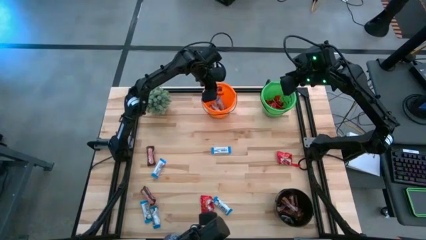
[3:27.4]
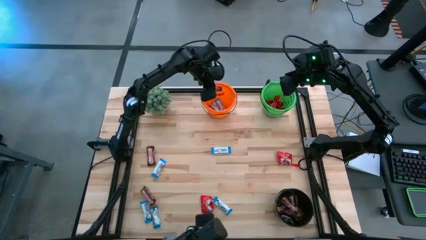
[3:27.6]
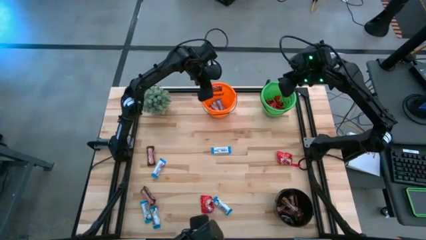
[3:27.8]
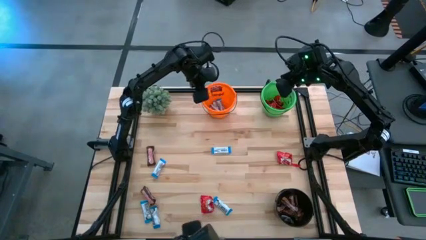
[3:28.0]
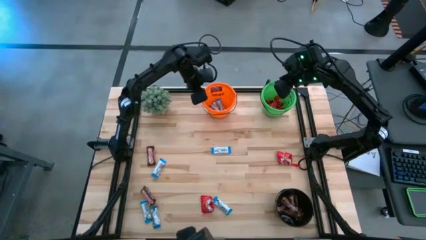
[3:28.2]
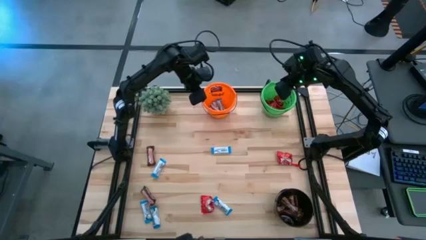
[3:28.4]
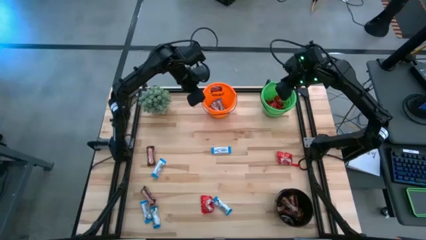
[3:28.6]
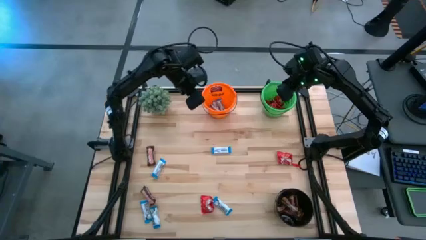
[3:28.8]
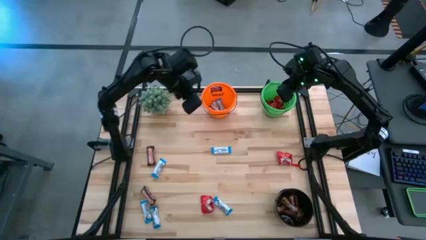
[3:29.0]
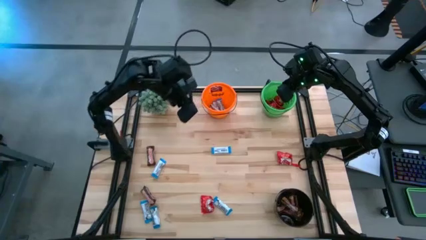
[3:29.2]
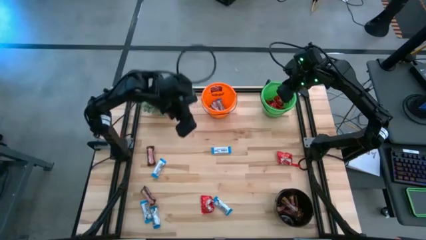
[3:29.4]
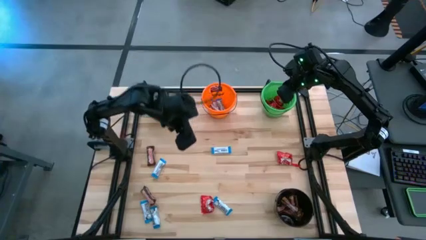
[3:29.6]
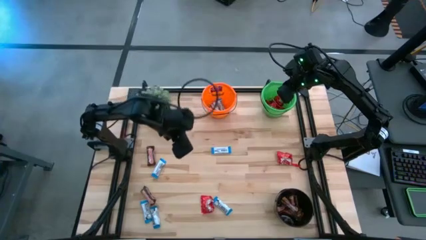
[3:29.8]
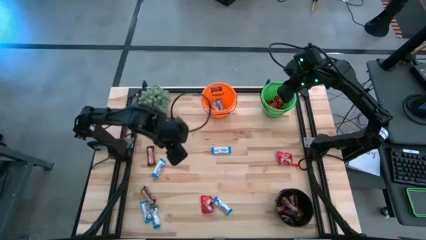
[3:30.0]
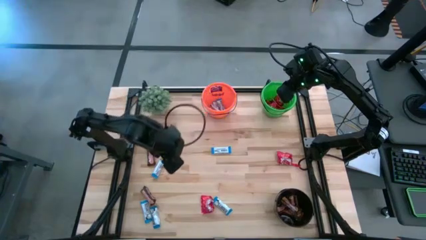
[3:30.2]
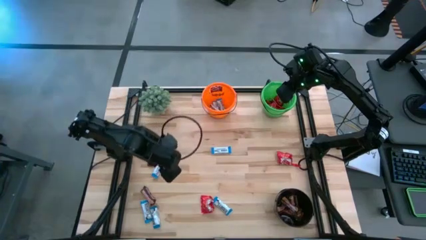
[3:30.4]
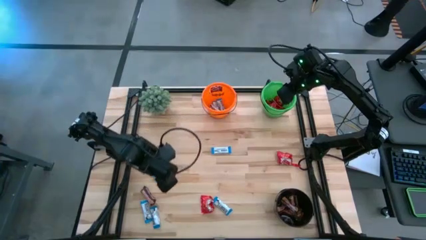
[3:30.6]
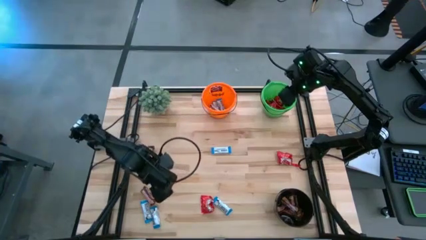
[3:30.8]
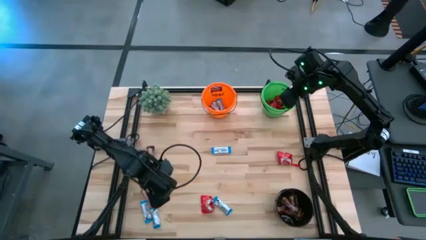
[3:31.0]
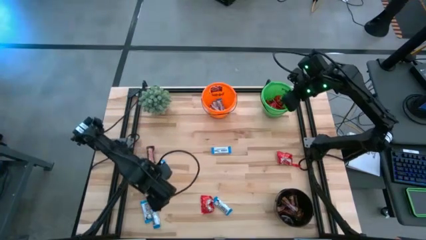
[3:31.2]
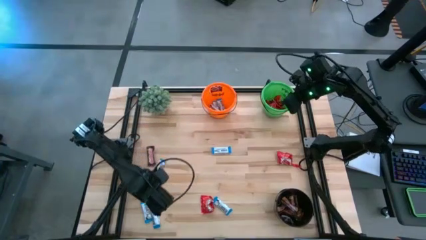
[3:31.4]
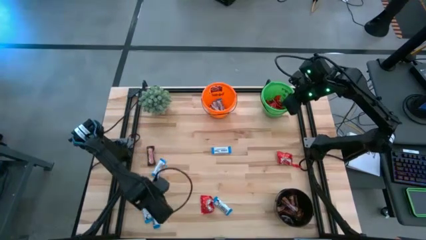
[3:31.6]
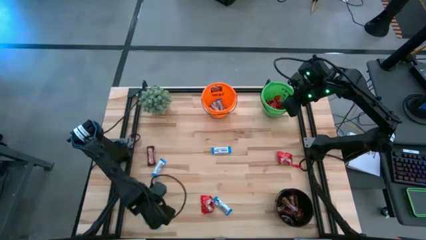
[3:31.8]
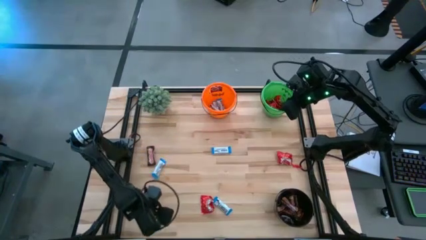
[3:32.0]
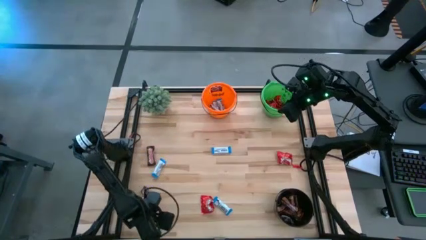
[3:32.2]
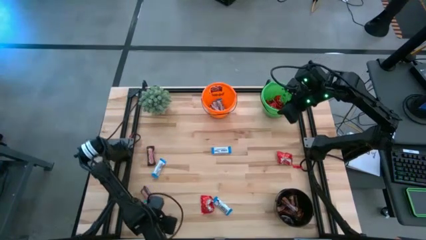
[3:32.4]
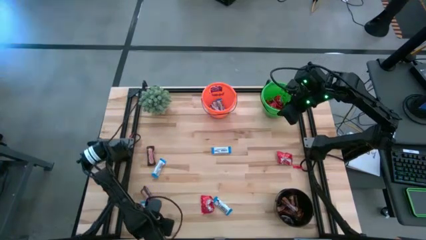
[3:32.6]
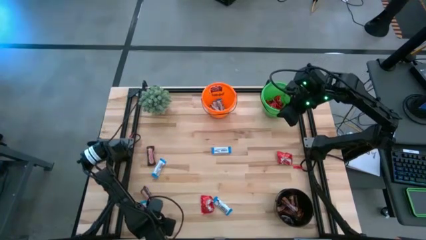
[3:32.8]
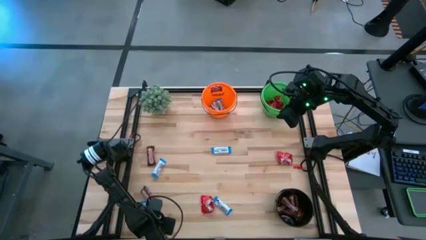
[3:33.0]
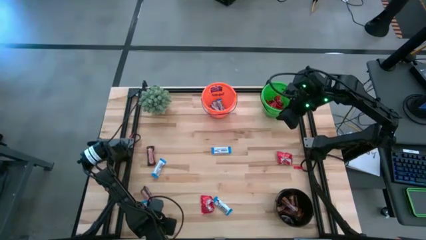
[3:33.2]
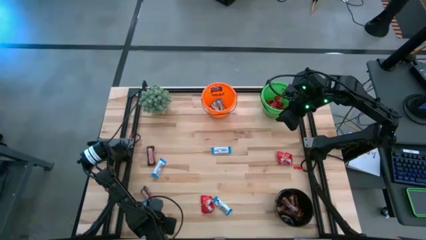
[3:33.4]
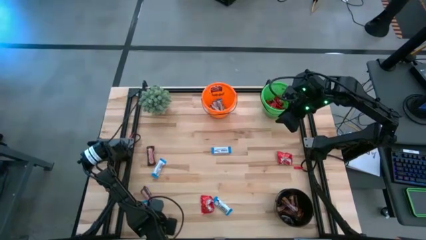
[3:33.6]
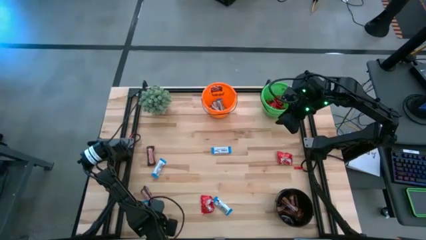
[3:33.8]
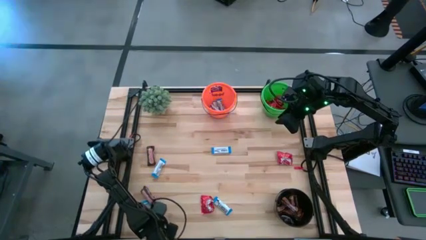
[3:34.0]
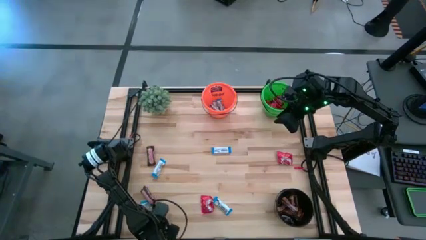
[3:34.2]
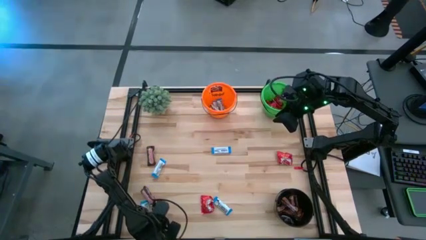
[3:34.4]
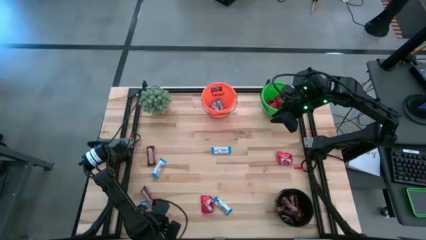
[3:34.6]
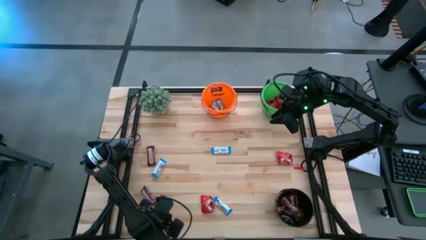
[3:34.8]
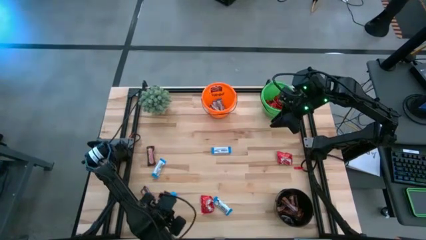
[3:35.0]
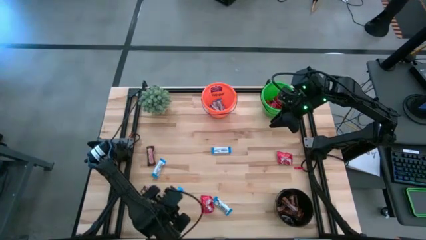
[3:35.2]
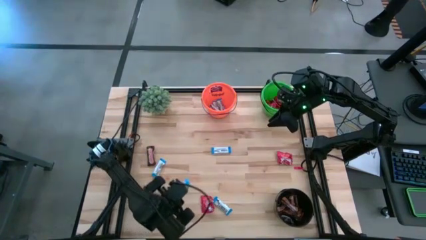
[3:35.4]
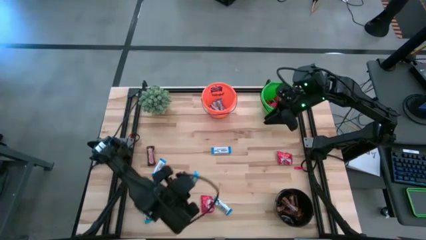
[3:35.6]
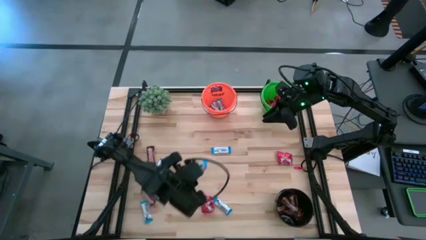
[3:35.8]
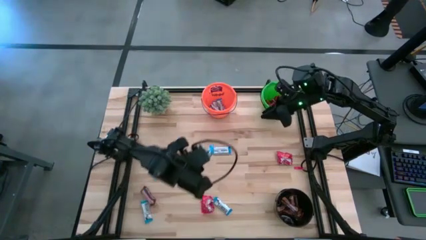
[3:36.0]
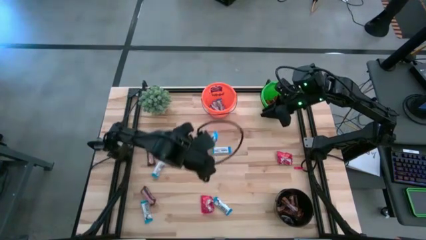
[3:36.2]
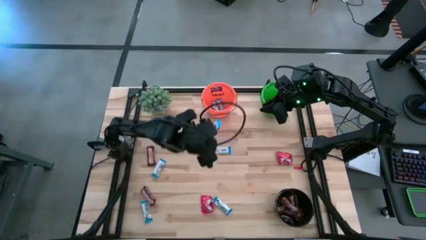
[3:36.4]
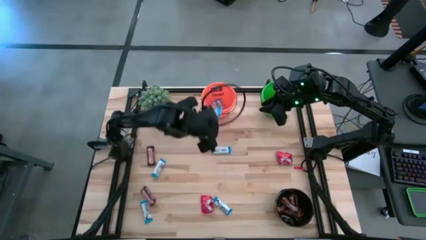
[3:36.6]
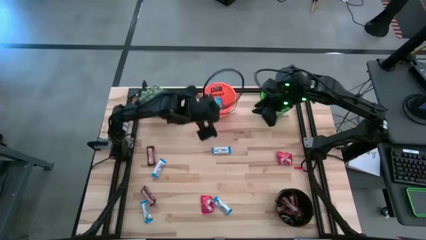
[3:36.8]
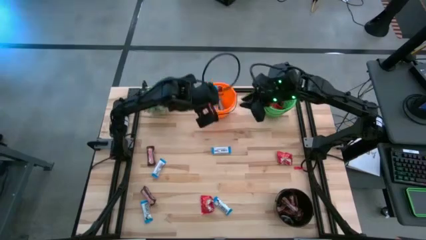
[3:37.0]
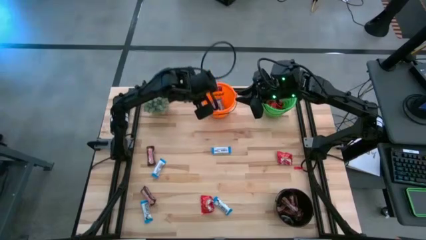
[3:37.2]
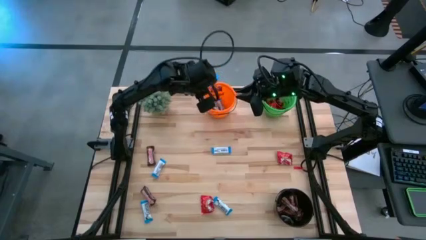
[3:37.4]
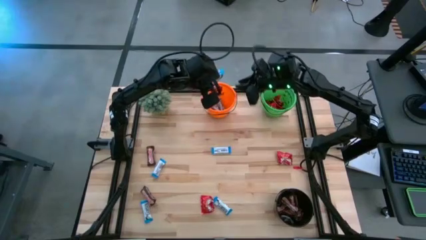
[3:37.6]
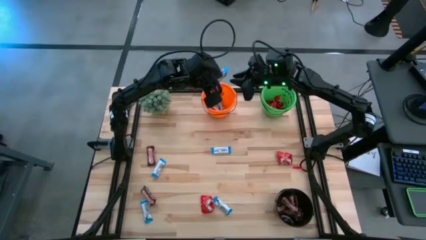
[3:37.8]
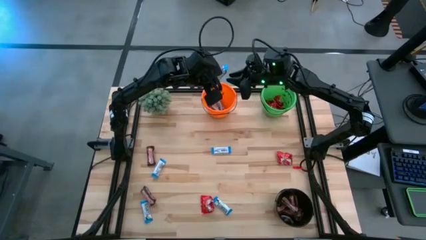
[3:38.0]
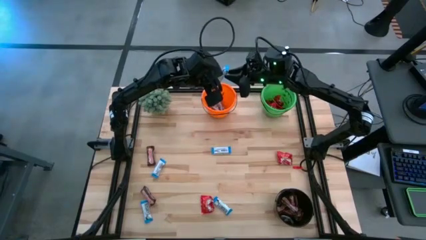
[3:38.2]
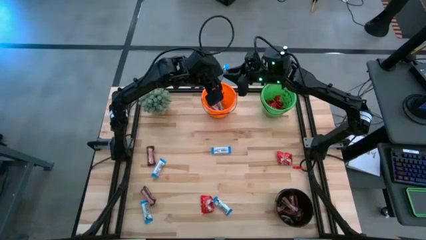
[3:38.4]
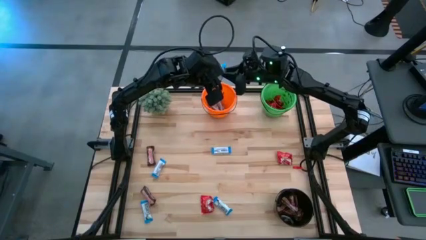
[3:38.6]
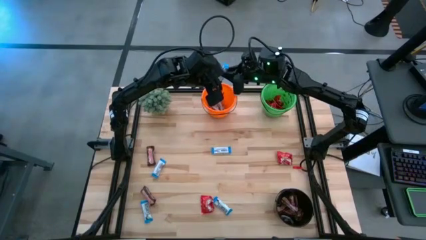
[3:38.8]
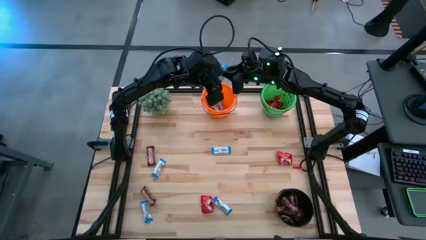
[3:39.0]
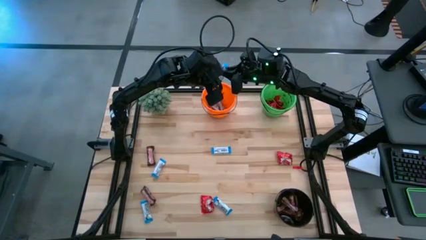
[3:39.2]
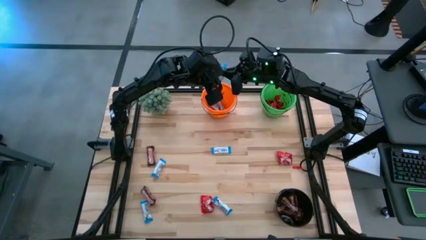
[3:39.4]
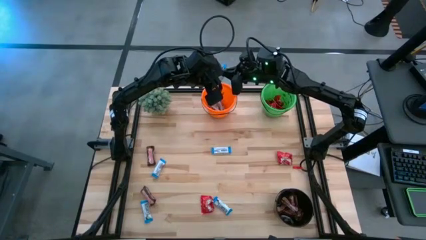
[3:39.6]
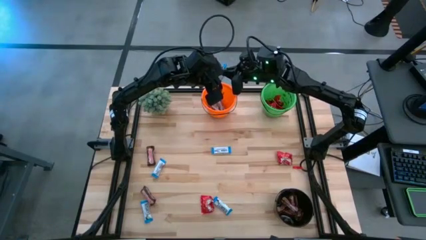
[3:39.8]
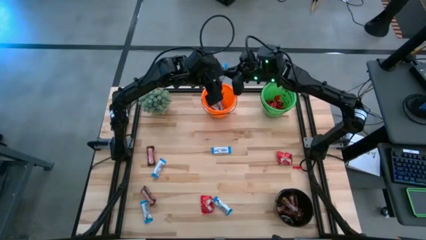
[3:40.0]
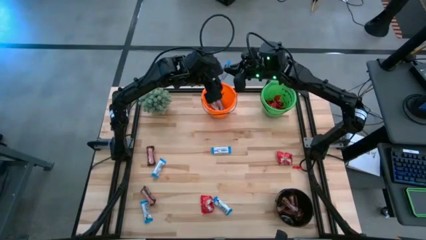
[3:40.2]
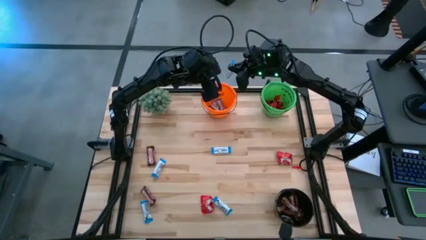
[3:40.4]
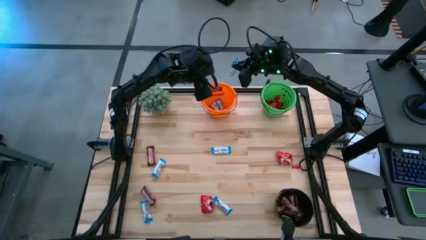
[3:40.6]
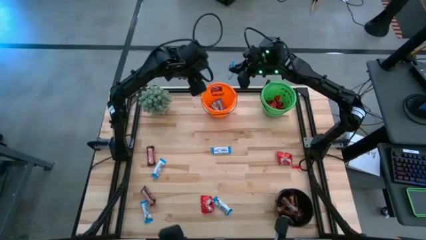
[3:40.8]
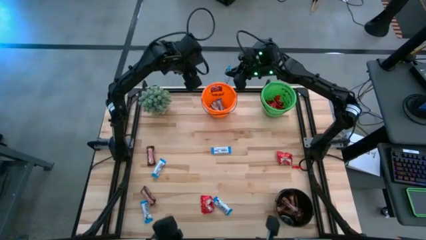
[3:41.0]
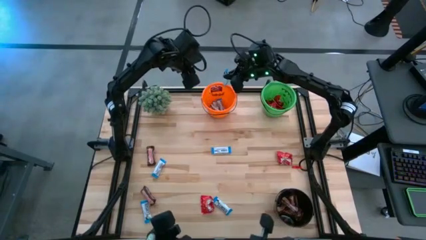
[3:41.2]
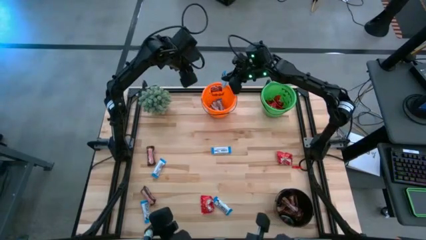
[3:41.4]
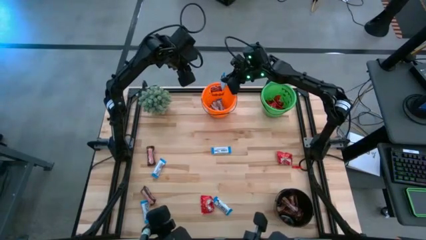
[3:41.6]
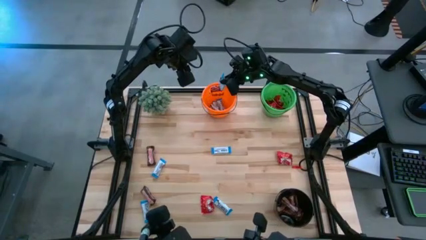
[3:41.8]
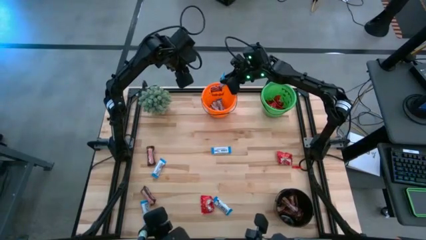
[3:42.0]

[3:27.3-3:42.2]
Task: Organize candy in baskets
Put the white chocolate bar into the orange bucket
